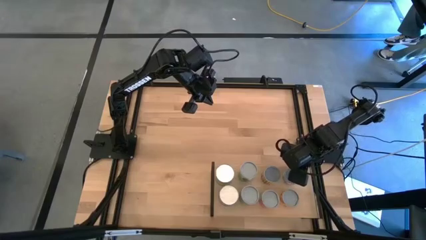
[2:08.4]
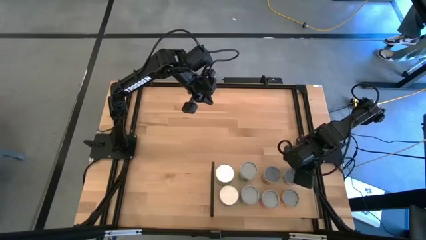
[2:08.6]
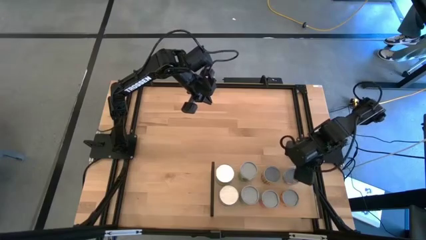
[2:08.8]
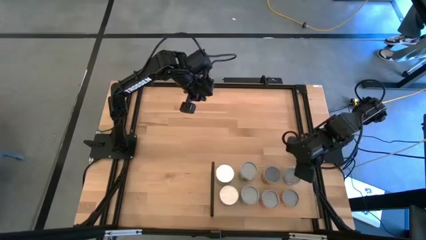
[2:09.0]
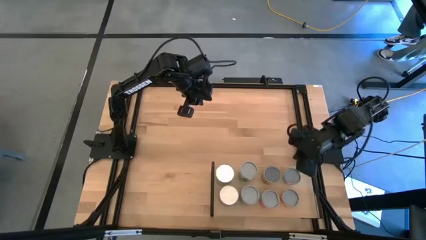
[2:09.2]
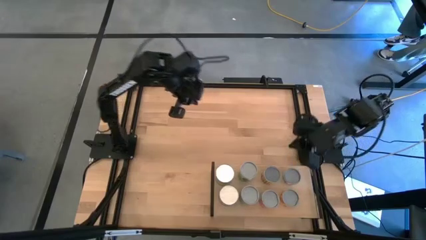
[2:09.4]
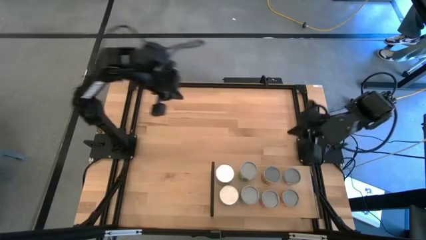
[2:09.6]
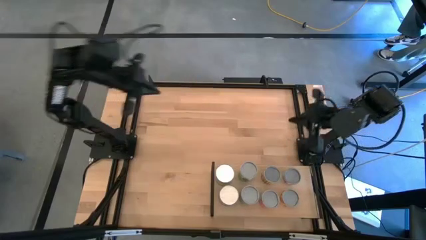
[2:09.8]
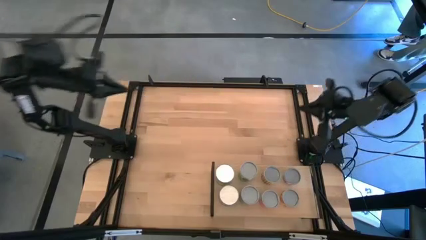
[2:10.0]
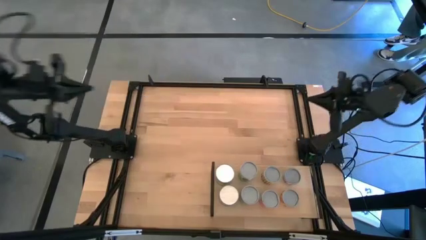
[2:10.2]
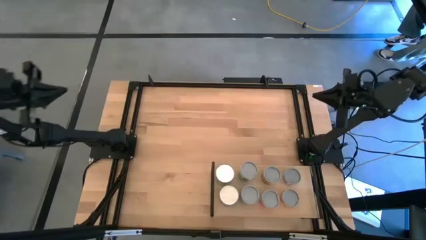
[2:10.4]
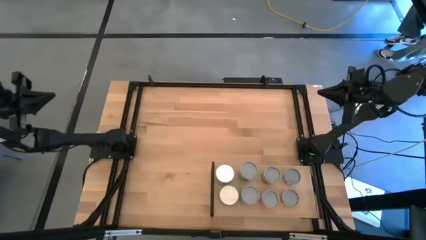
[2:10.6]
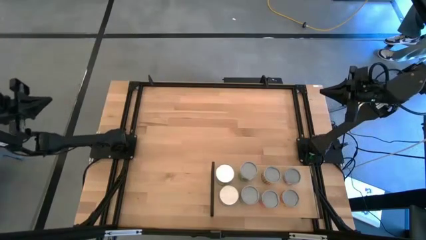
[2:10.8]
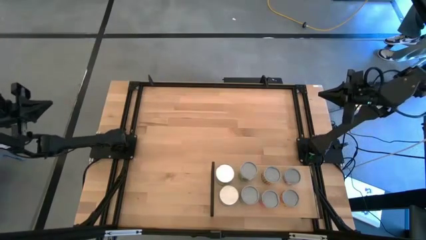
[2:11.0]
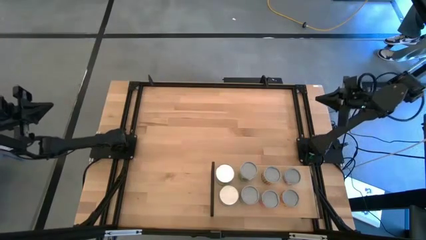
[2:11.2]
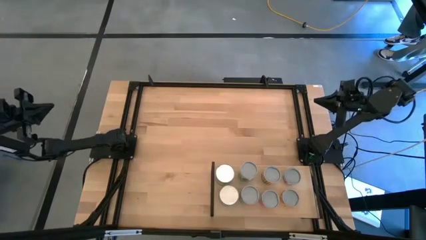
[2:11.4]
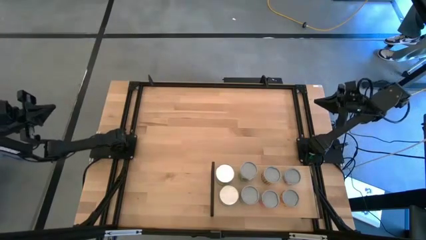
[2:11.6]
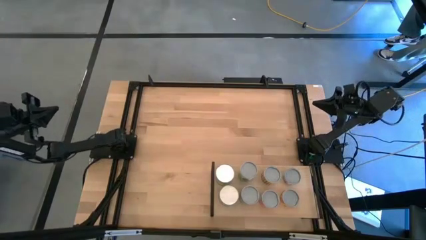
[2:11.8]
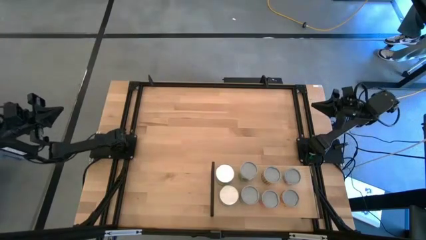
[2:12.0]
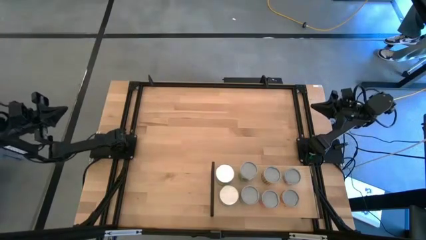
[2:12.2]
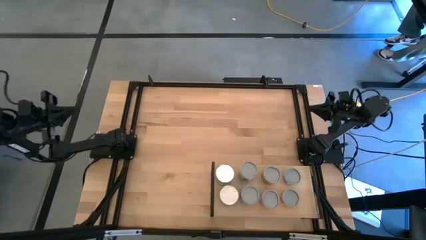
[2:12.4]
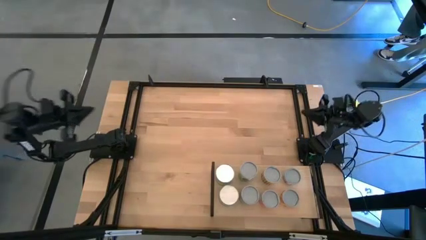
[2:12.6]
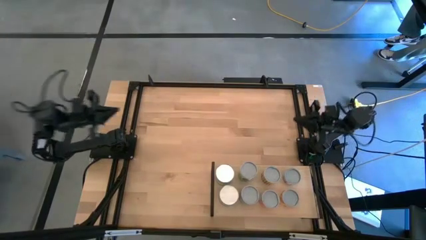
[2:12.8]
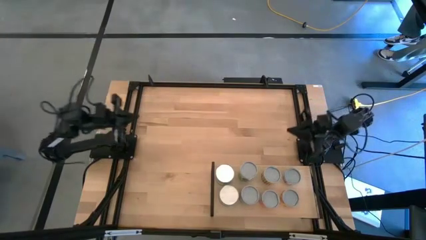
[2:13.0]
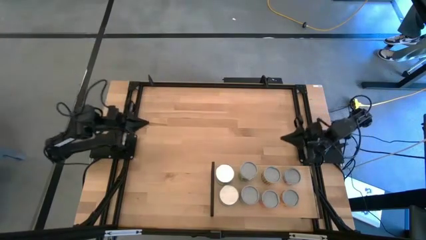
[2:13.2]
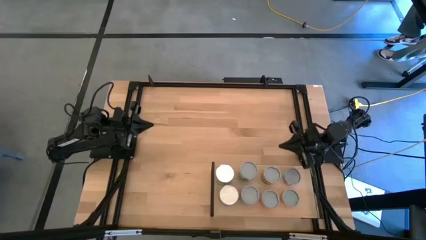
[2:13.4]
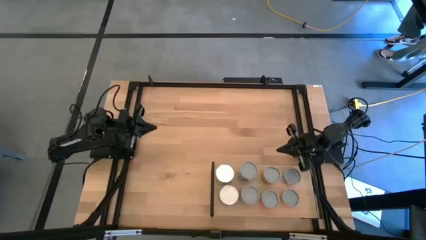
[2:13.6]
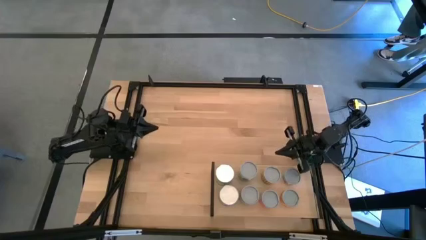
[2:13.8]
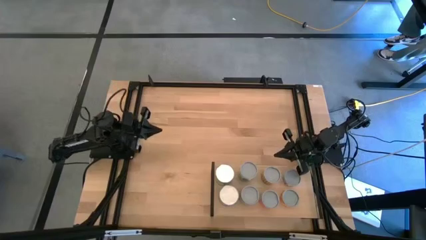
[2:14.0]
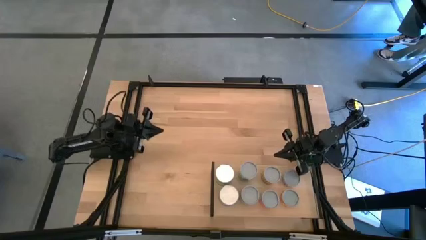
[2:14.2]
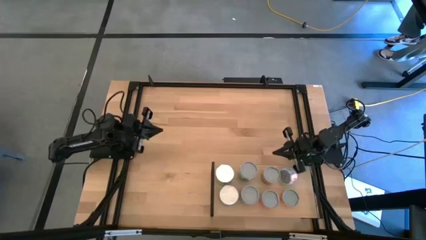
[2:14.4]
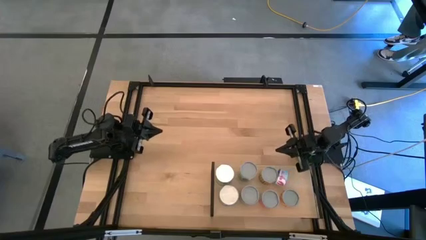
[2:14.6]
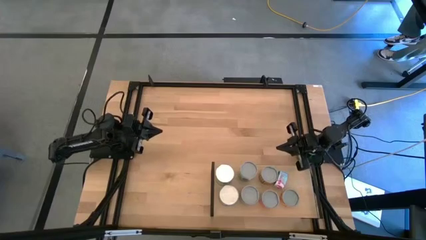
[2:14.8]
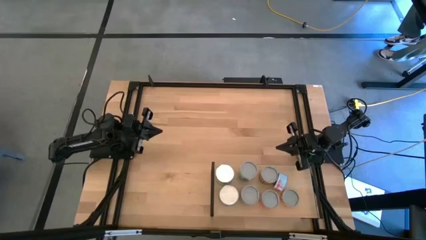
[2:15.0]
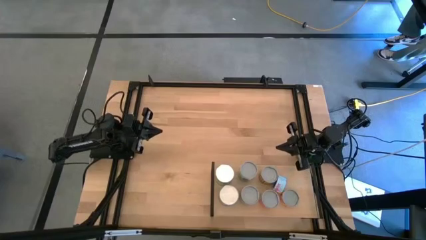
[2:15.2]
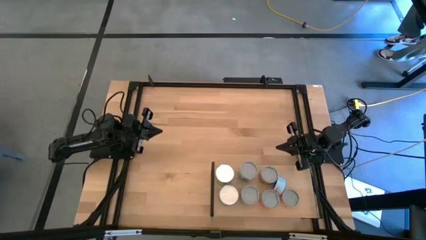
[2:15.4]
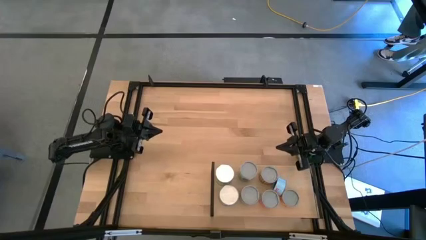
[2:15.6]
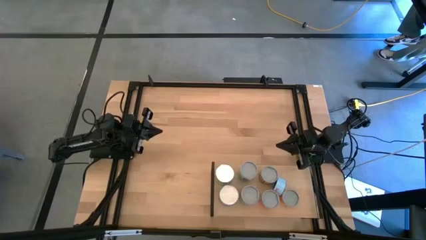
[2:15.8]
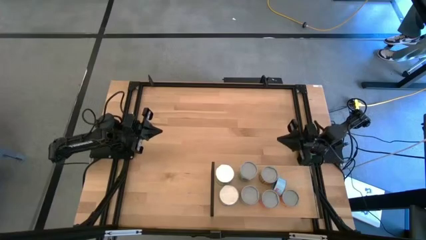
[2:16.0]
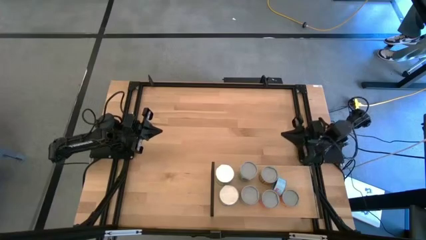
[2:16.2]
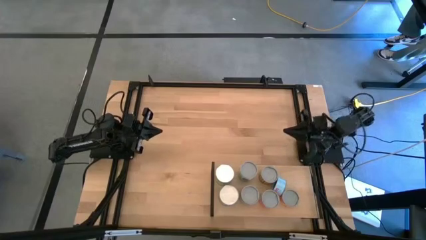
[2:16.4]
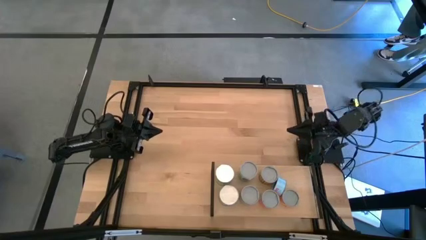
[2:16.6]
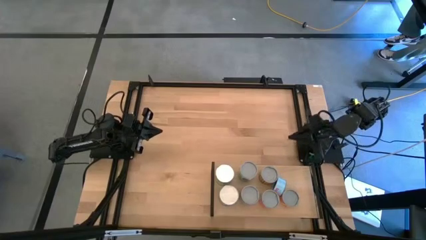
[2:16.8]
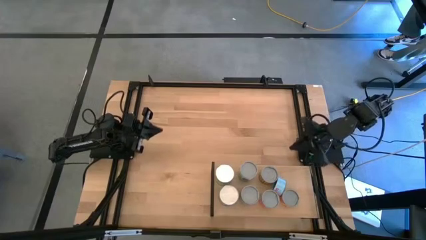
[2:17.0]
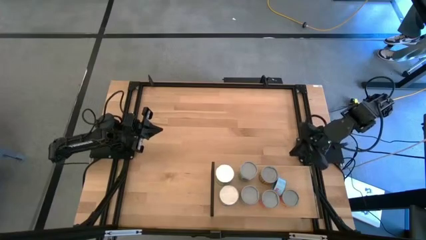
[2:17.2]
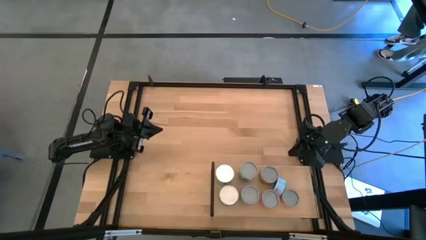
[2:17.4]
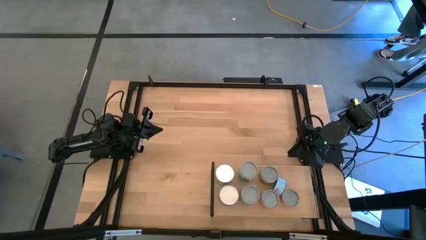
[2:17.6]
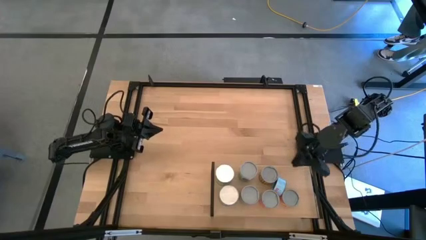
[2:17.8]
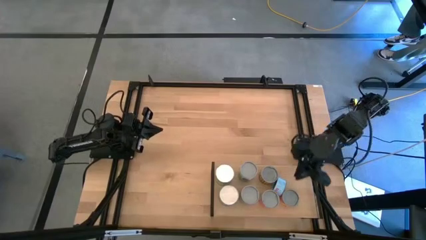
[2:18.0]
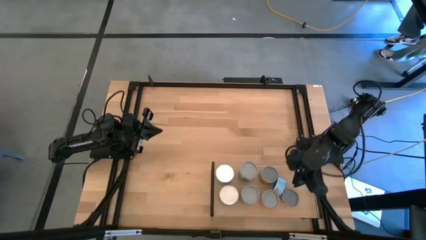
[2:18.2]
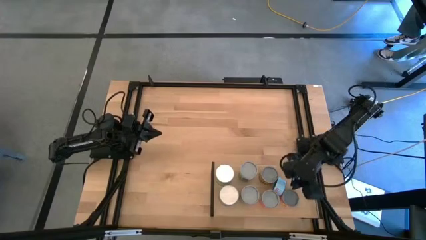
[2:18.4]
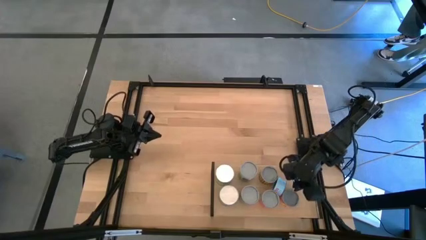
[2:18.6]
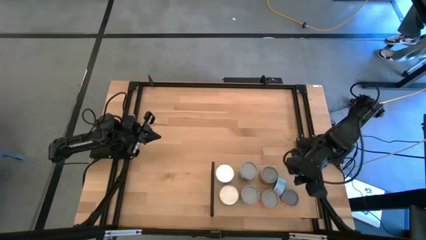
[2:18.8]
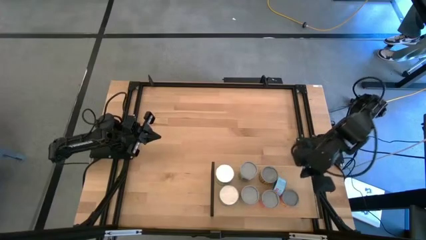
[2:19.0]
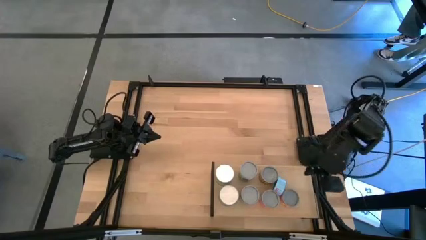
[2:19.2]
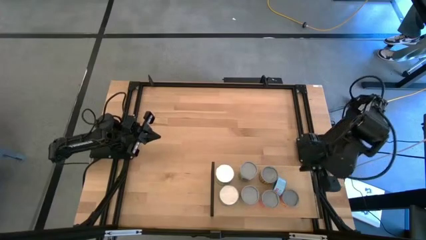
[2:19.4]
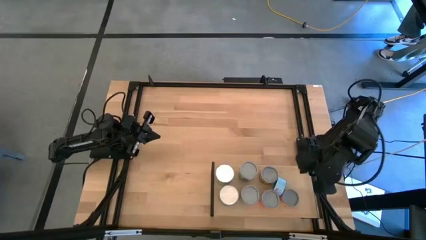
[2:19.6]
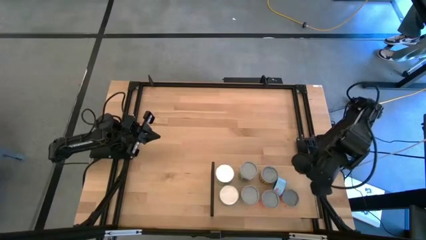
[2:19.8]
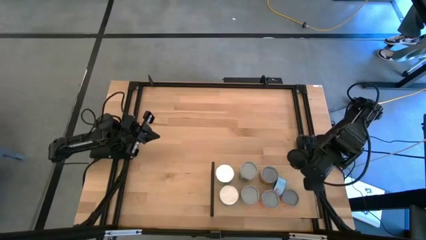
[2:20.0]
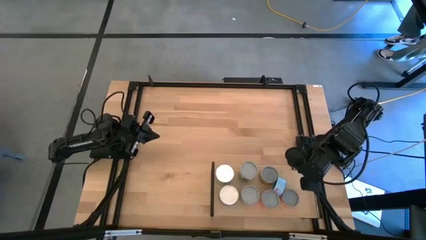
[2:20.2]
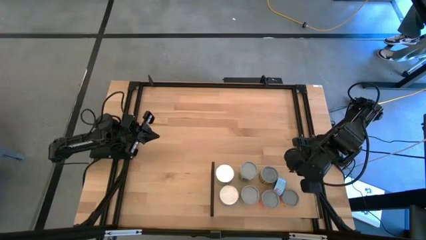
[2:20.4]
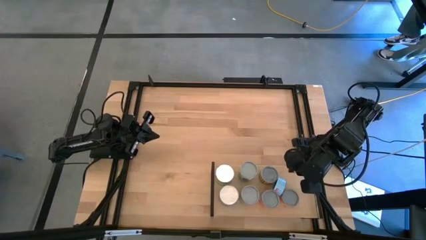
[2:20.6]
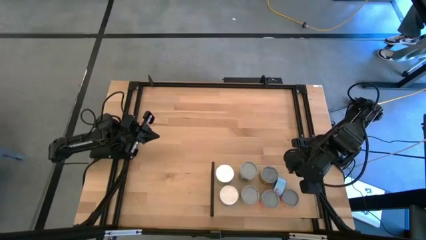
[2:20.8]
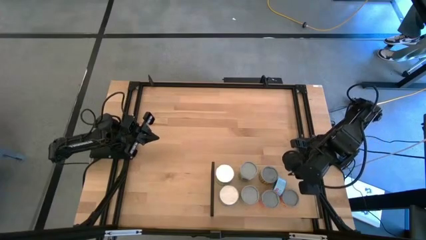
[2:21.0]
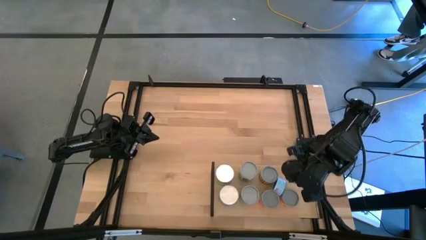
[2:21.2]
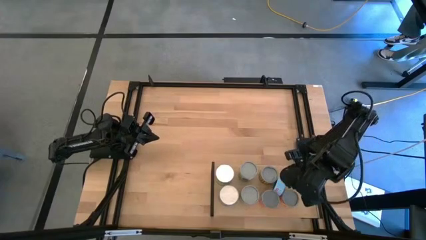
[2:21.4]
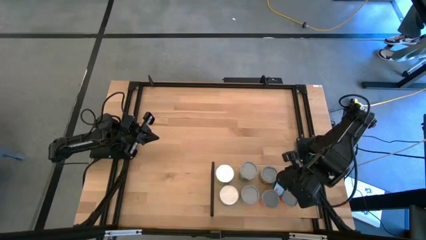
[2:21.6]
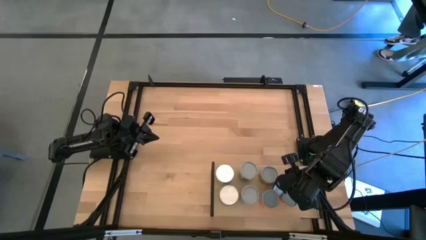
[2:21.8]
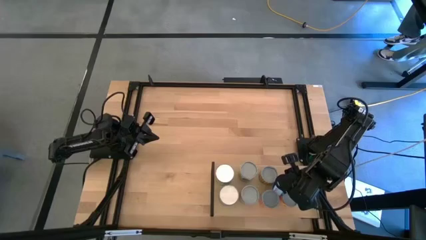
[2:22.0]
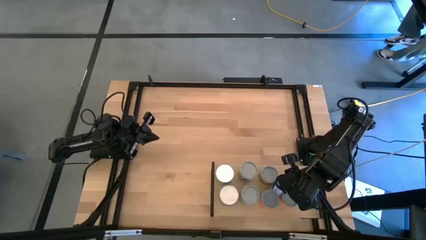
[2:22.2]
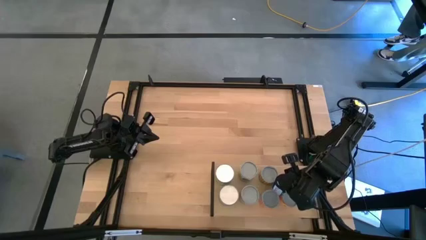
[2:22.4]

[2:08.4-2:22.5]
Task: Pick and place cans onto a shelf
Adjust the tuna can on the shelf
